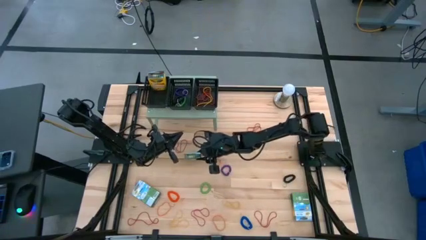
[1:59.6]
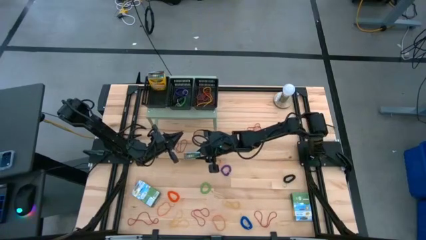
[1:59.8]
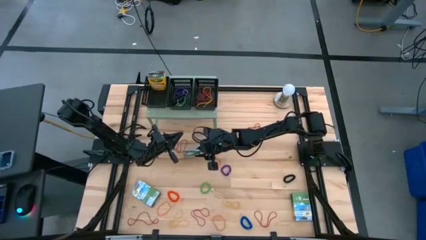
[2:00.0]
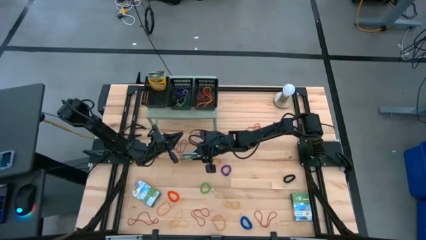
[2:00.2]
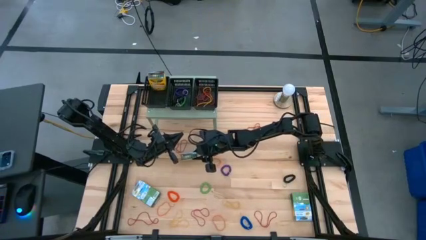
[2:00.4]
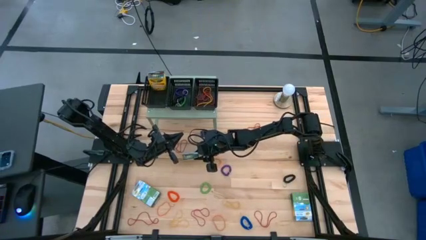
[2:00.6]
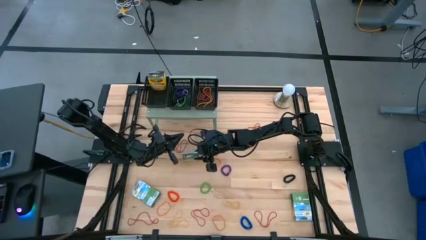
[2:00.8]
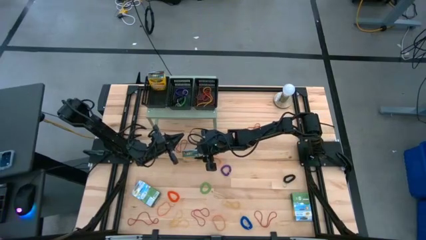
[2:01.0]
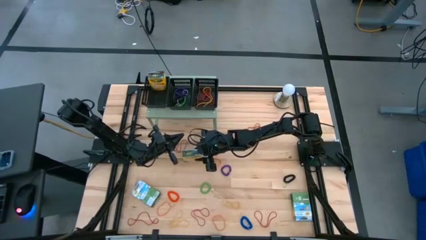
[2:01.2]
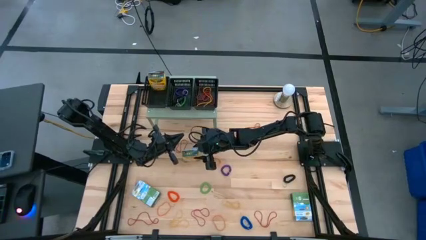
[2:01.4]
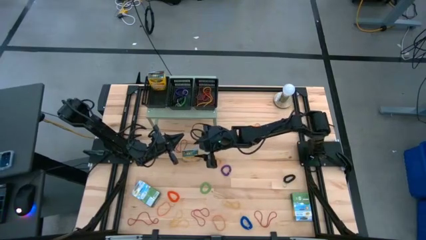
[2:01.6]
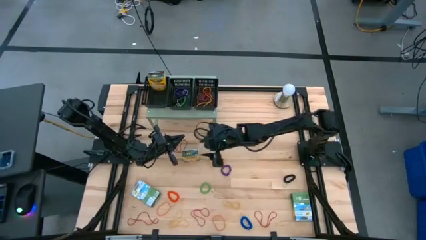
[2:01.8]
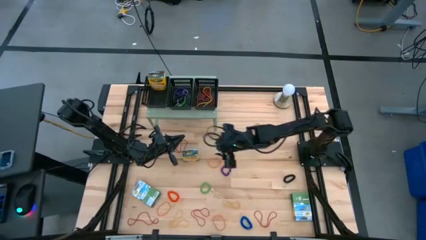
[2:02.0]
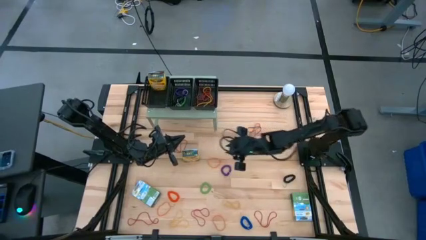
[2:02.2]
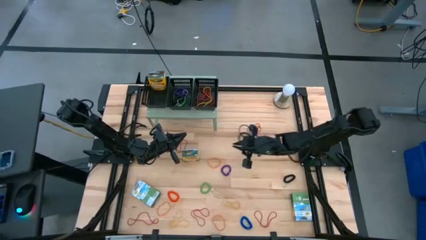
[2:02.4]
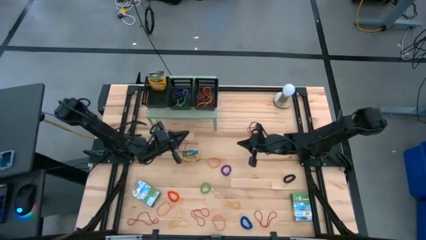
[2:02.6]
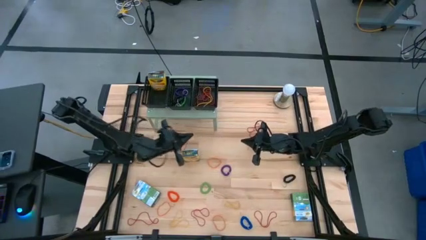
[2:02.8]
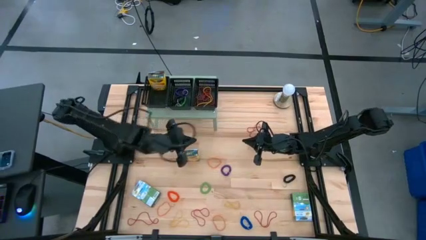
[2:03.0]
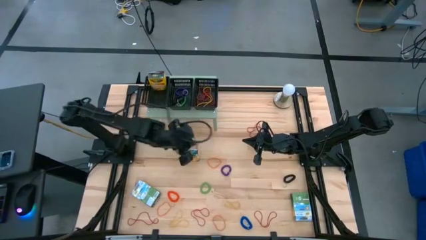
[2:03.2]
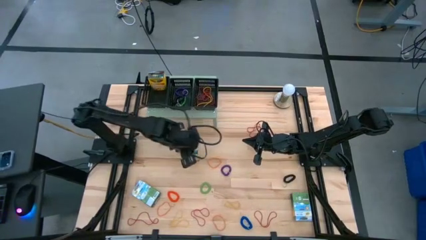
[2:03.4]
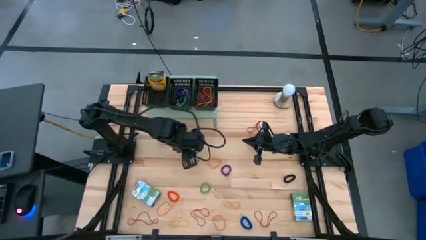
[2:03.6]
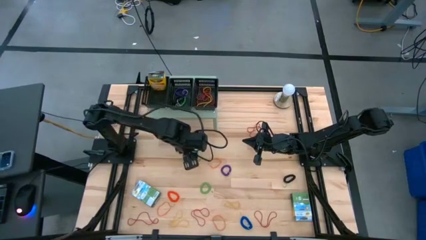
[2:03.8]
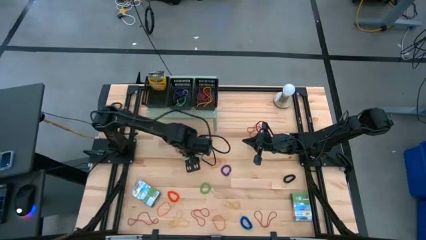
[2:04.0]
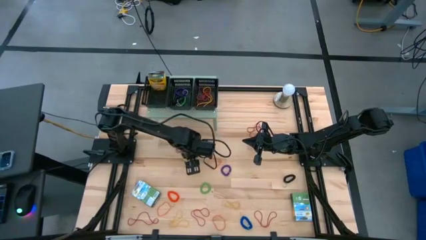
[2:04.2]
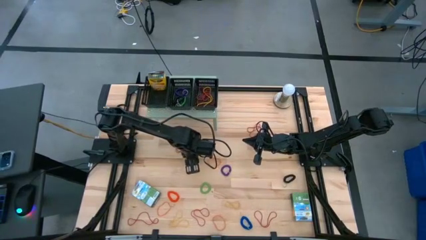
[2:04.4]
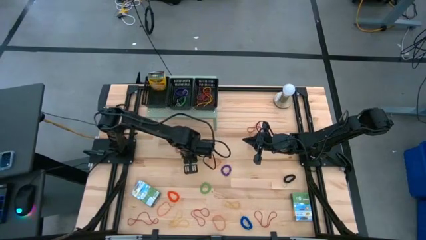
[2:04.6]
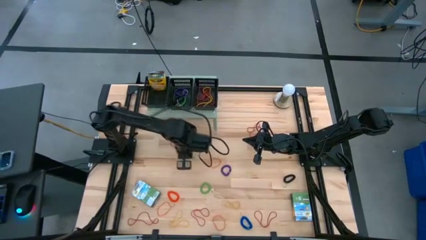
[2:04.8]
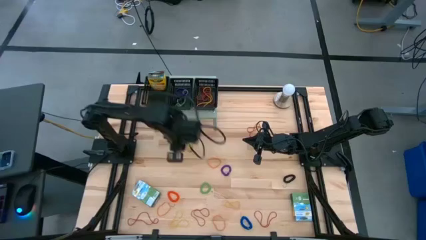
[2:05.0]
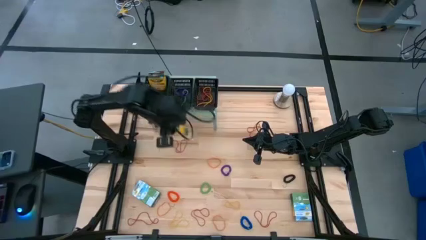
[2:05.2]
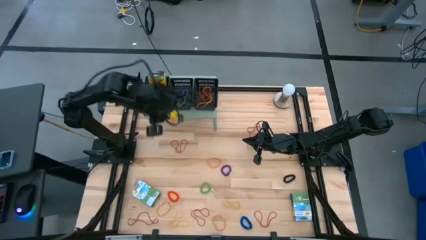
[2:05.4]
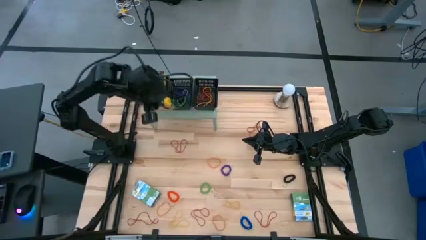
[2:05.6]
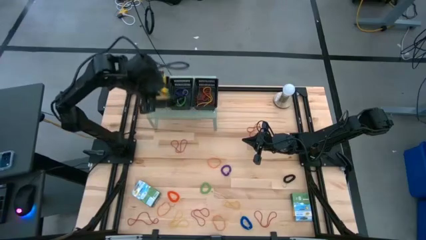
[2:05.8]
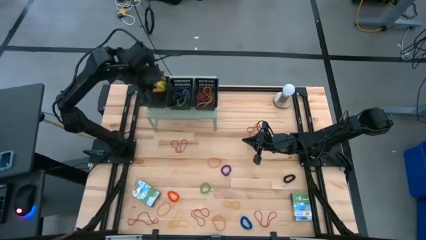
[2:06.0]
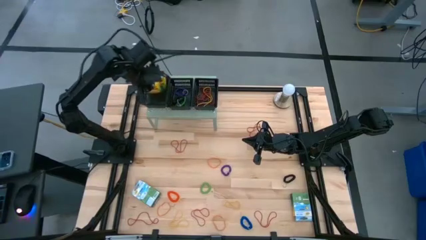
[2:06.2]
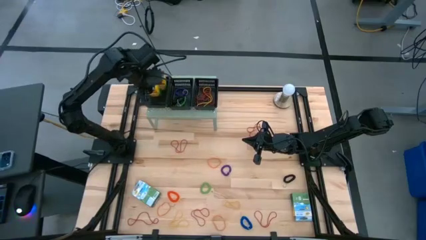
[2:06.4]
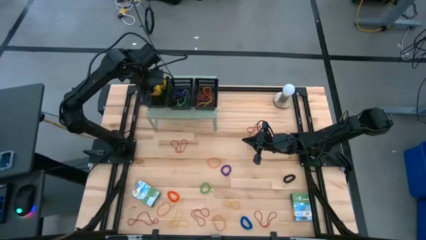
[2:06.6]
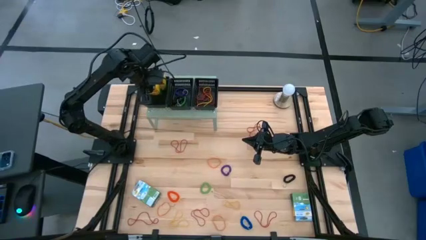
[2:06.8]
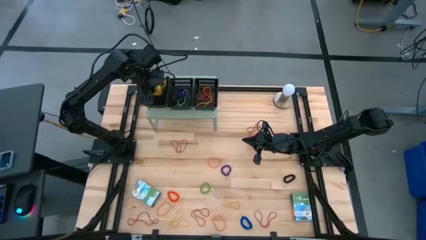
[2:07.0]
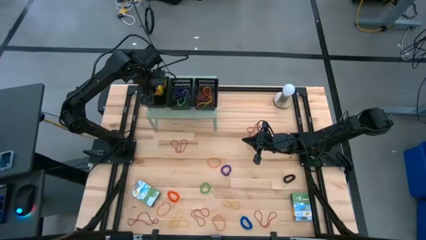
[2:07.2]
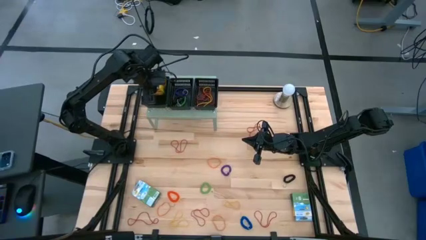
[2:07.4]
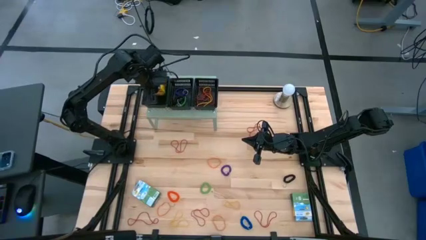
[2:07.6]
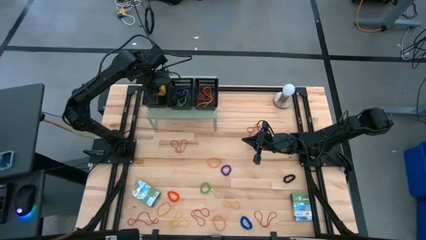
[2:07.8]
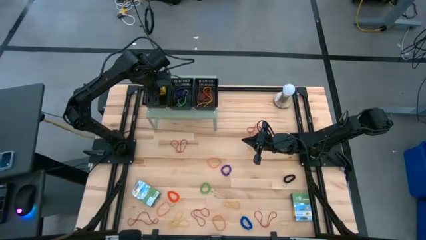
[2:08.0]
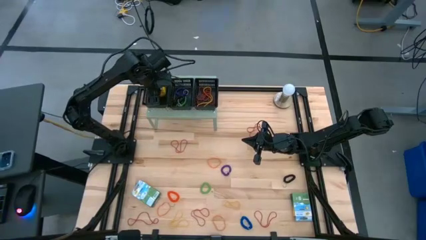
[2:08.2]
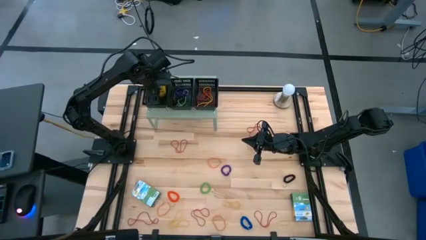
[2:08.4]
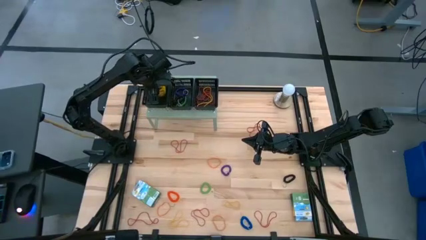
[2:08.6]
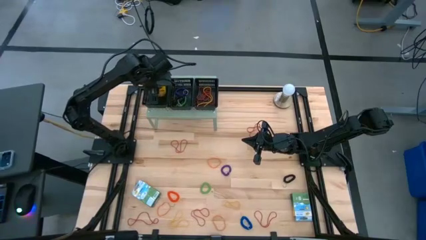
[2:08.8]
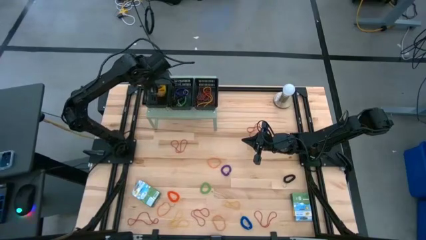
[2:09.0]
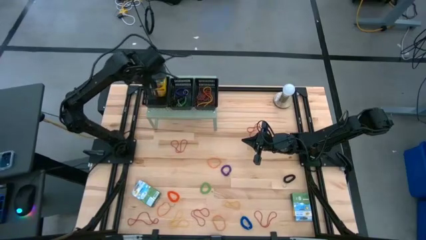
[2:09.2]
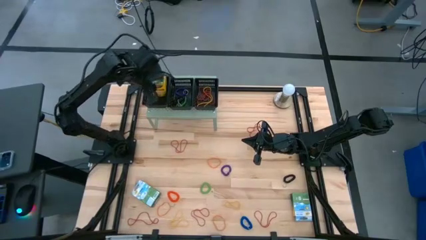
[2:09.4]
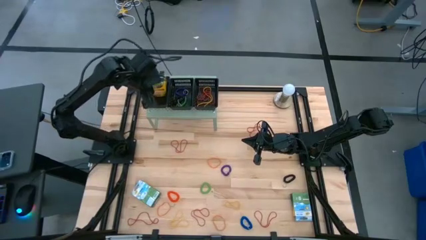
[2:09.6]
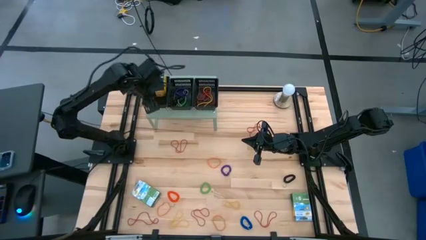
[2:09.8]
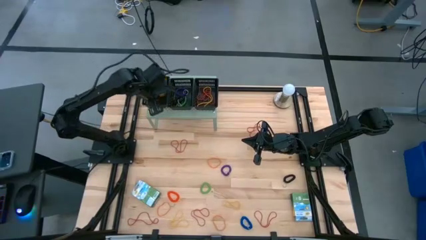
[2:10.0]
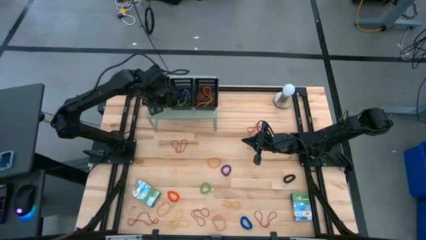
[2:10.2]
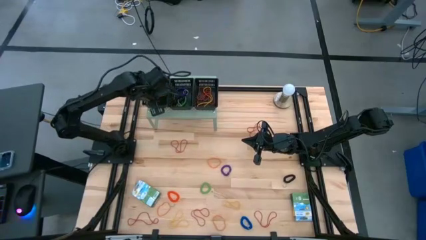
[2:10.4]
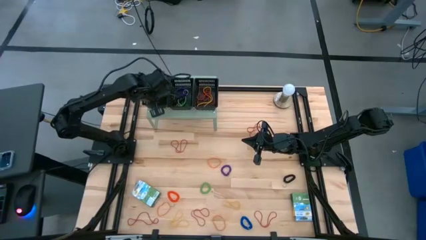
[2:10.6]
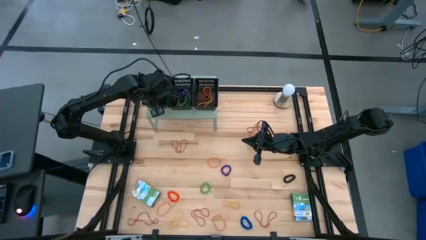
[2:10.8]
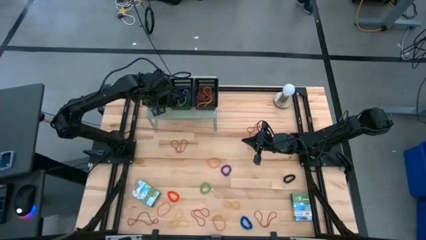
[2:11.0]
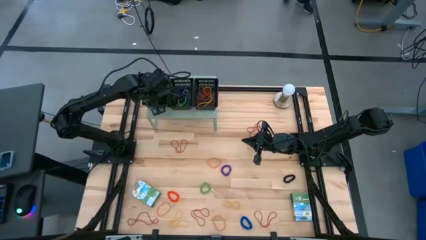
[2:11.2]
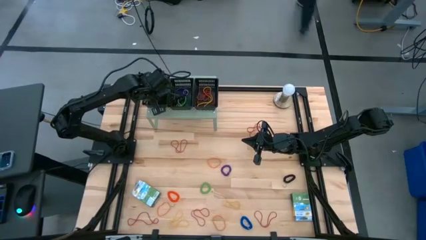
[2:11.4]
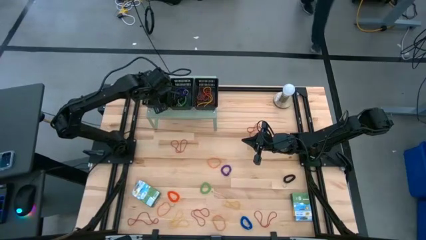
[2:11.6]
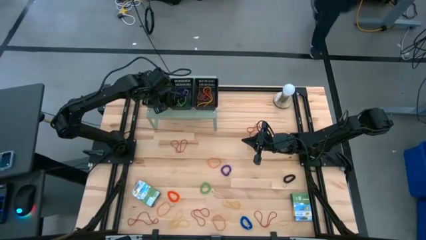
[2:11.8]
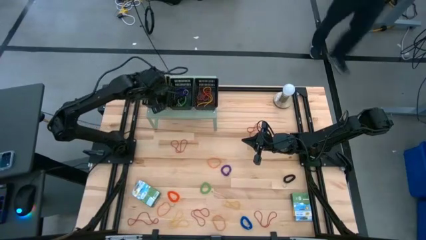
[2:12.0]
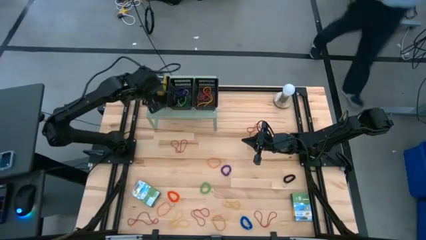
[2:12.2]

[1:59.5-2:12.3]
Task: Pick & Place Office Desk Supplies
Put the crayon box into the left black bin on the shelf

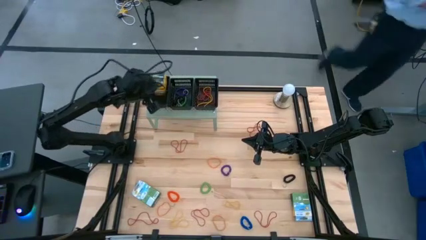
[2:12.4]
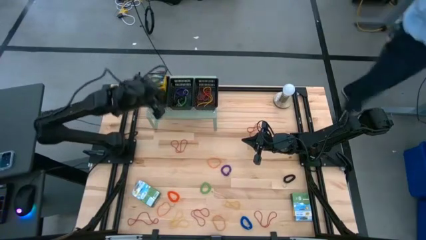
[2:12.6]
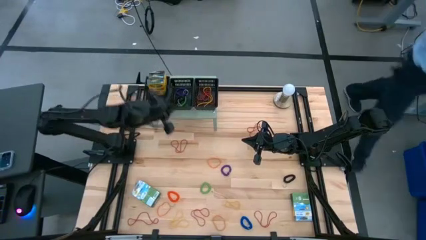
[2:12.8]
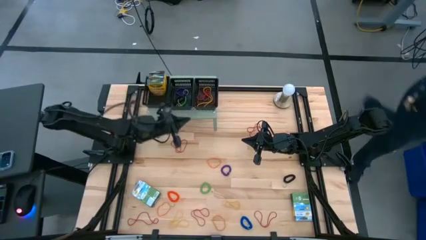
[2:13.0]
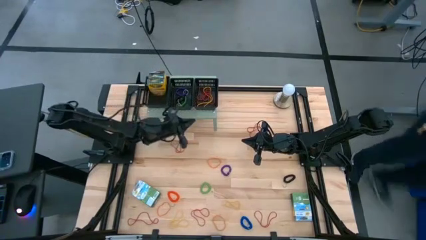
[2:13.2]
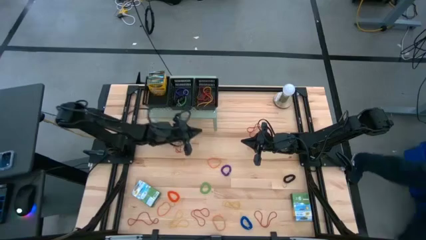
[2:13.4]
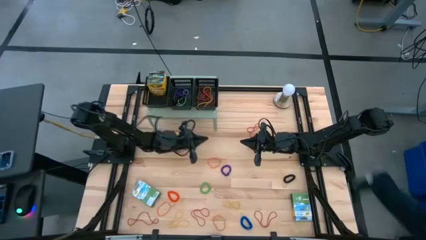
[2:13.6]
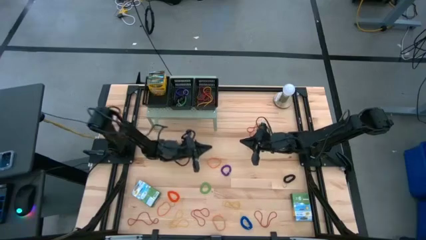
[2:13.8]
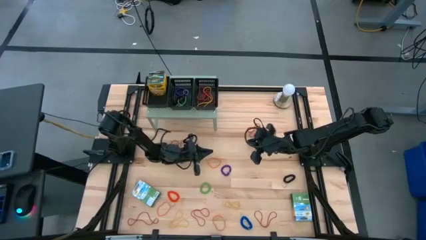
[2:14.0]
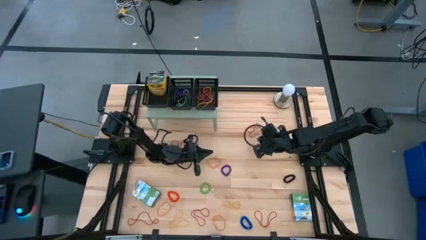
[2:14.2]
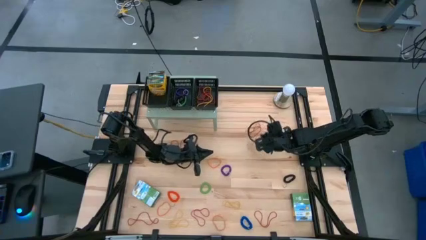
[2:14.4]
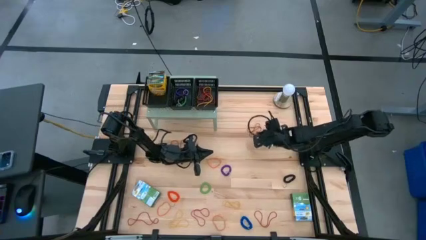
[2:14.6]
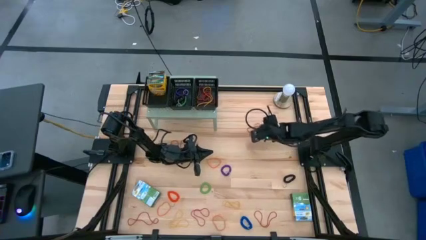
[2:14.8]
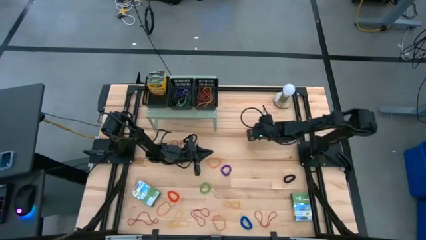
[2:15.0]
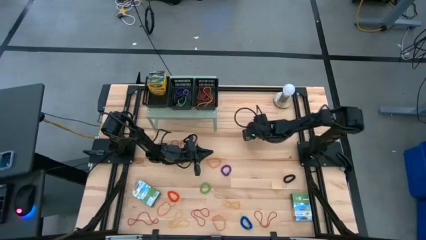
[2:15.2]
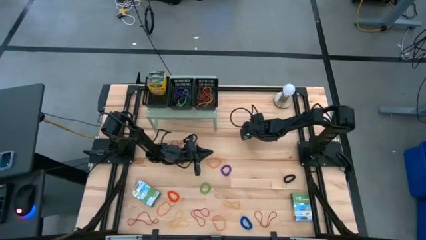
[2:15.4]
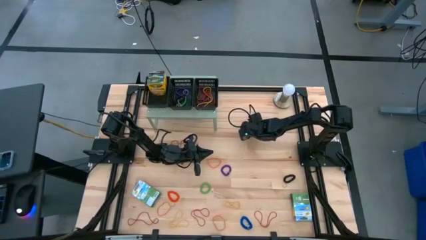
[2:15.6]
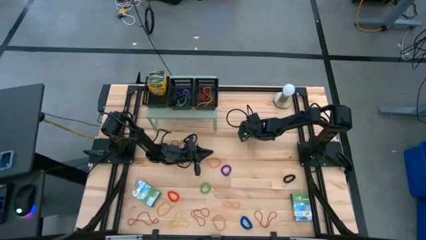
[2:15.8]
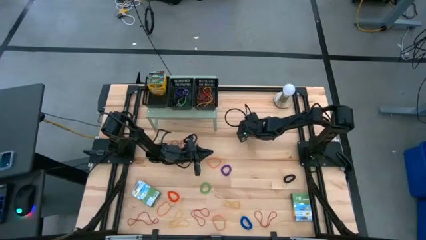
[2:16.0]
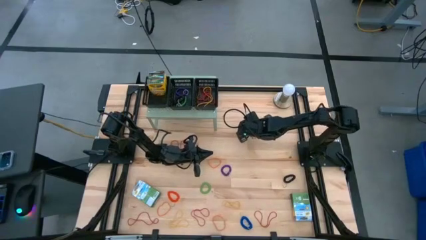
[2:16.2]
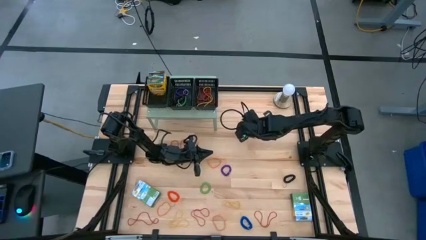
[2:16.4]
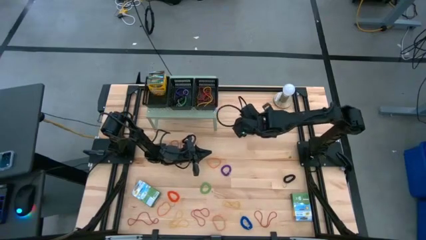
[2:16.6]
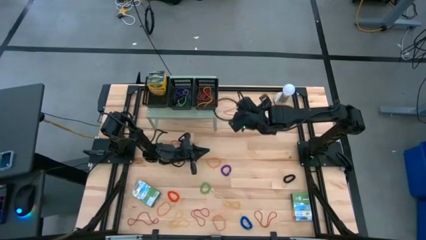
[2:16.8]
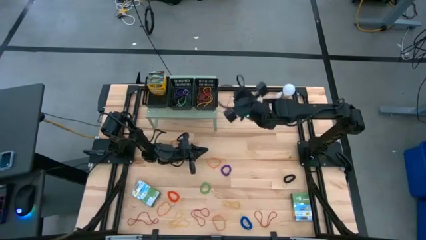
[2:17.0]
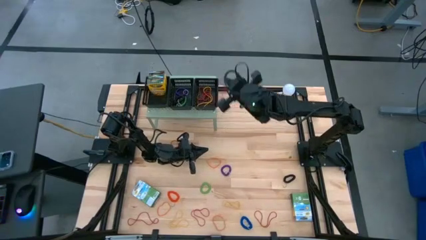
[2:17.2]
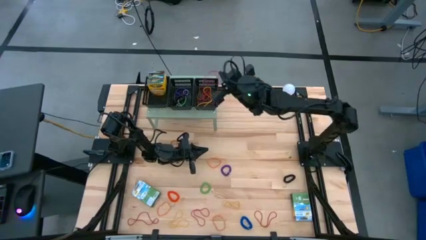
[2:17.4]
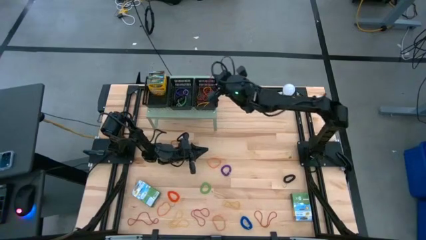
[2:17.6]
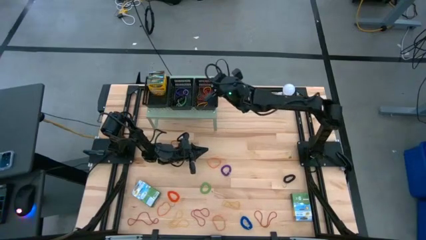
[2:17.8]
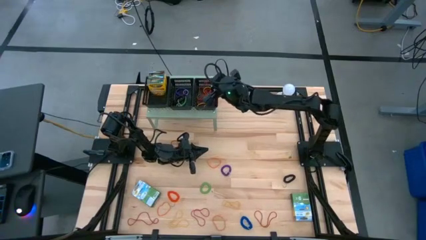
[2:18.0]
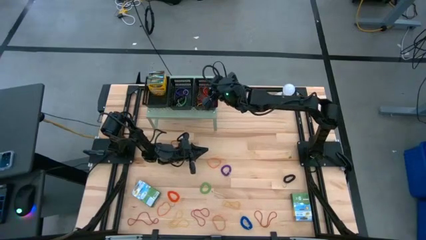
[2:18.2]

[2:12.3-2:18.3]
Put the red rubber band into the right black bin on the shelf
